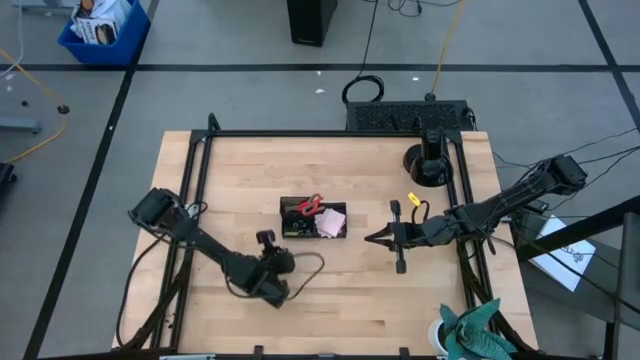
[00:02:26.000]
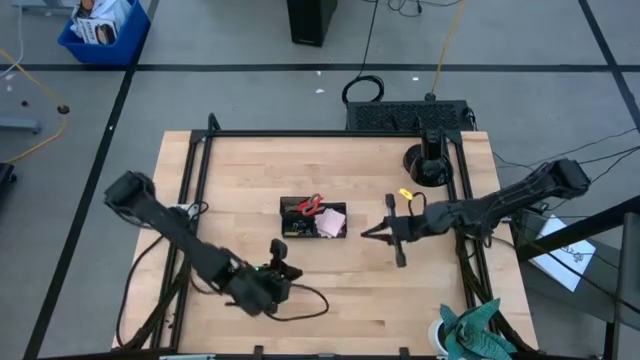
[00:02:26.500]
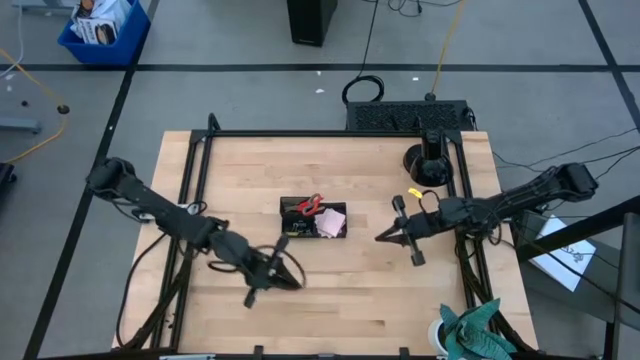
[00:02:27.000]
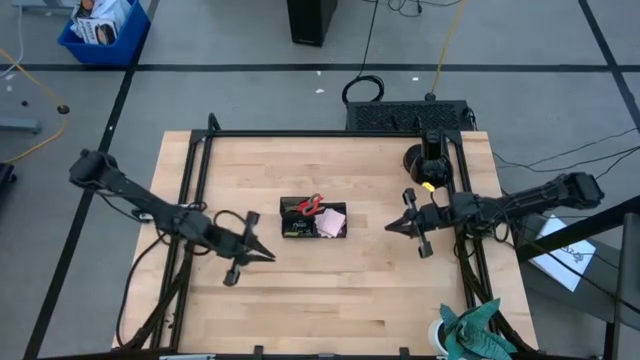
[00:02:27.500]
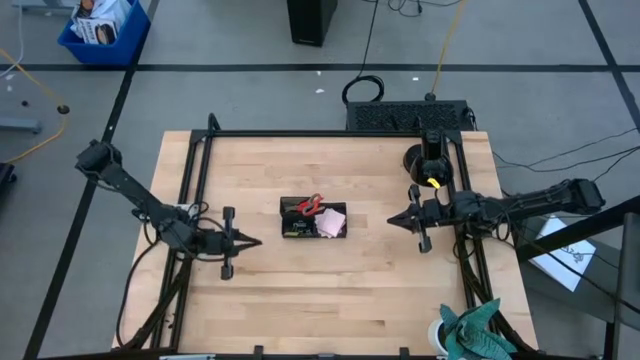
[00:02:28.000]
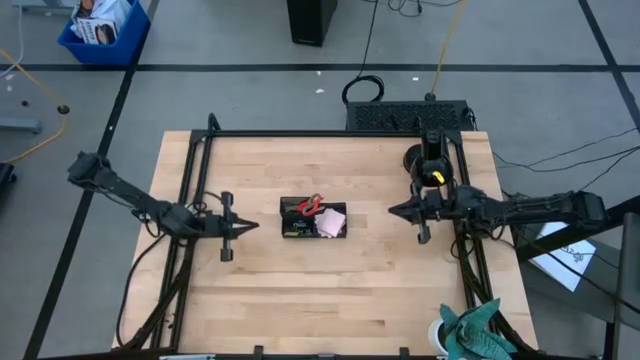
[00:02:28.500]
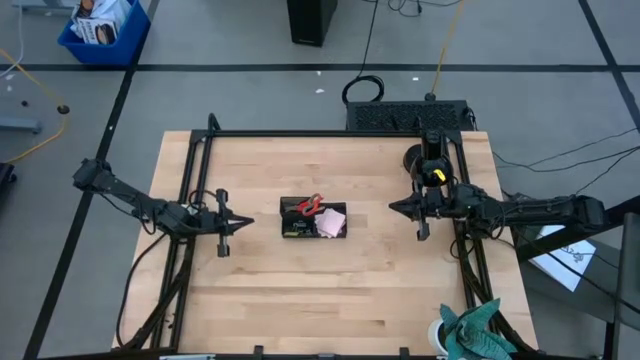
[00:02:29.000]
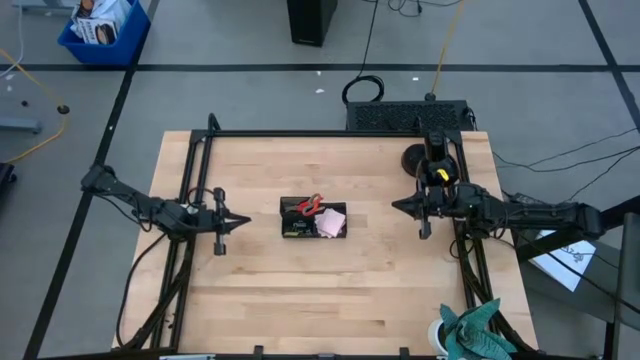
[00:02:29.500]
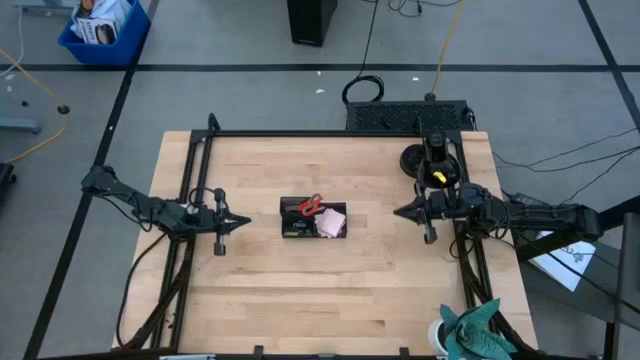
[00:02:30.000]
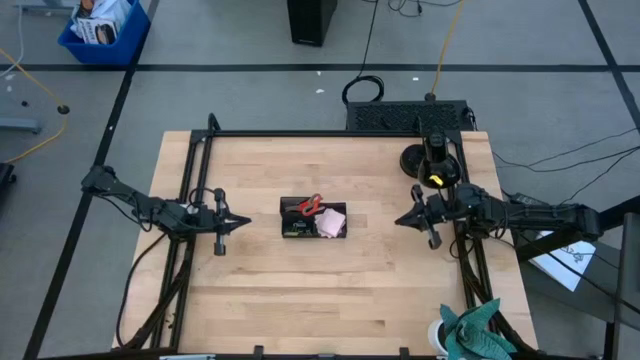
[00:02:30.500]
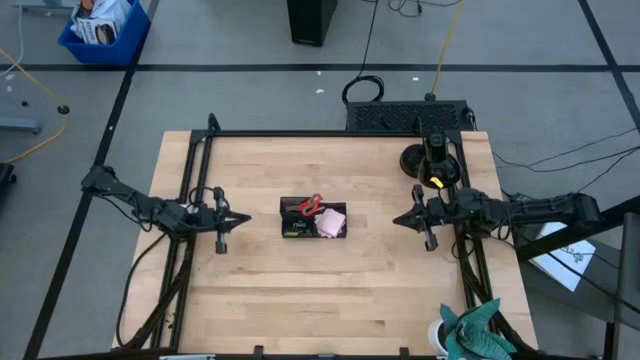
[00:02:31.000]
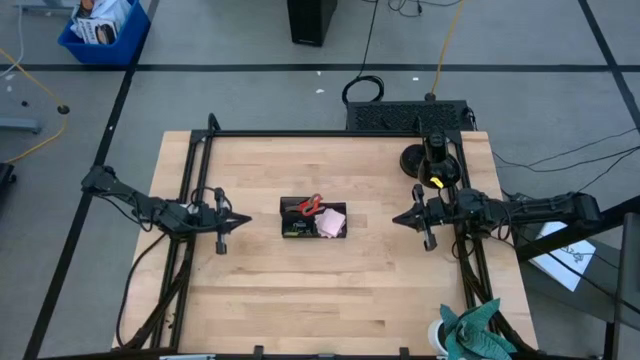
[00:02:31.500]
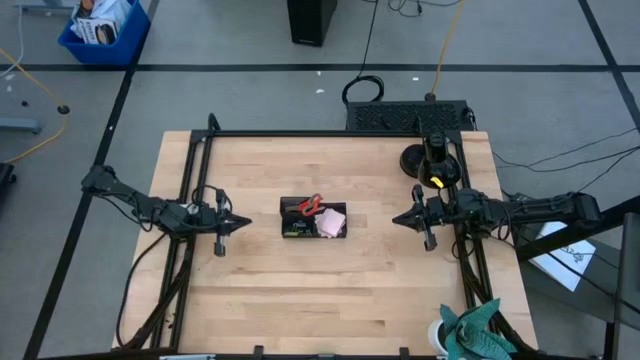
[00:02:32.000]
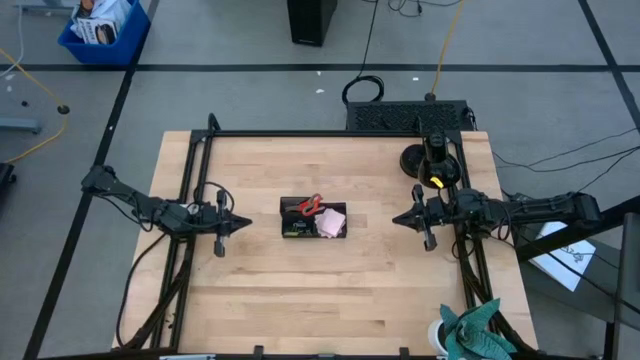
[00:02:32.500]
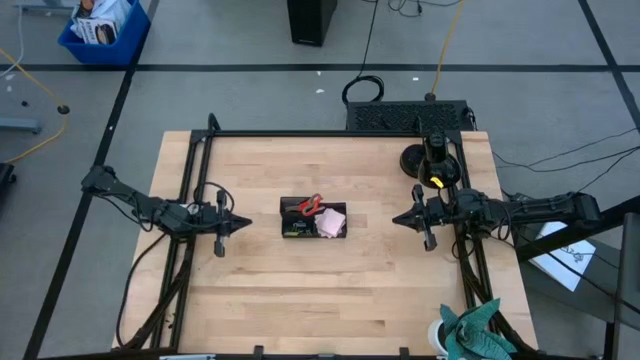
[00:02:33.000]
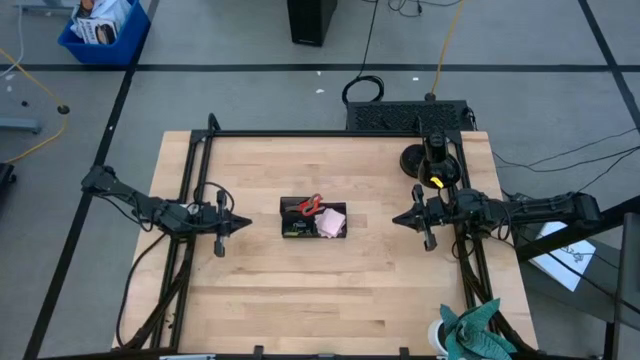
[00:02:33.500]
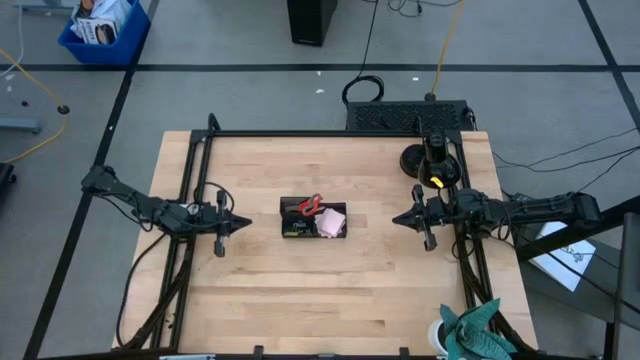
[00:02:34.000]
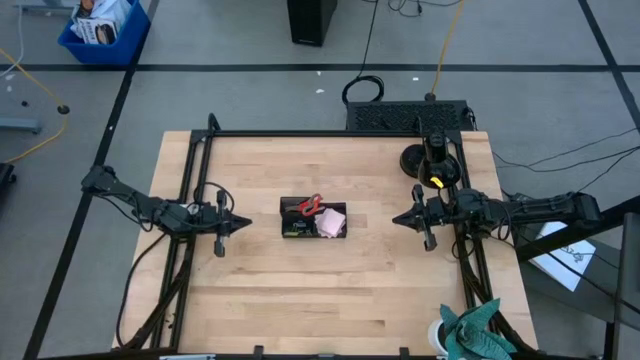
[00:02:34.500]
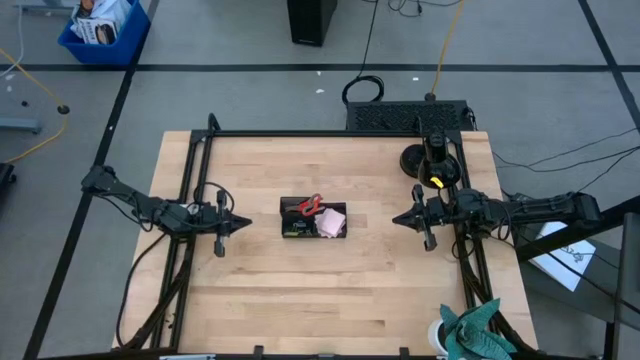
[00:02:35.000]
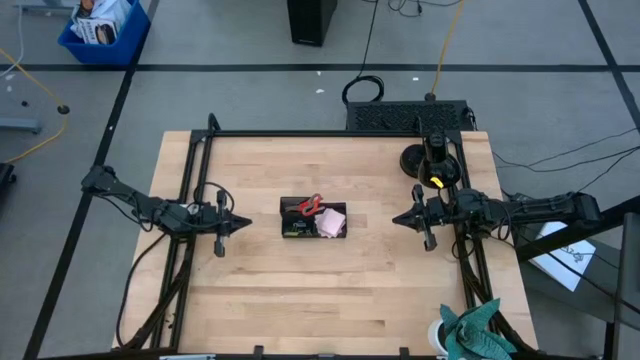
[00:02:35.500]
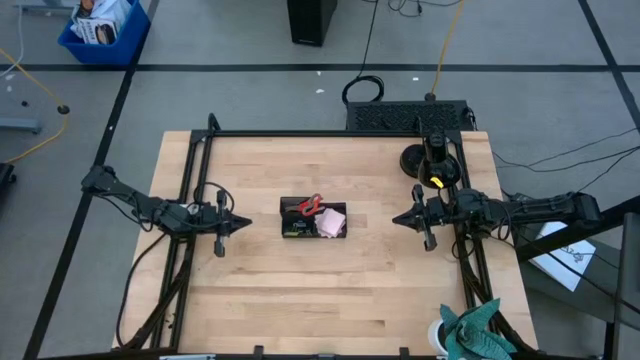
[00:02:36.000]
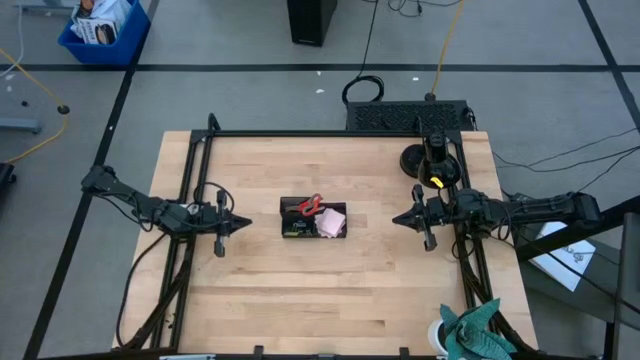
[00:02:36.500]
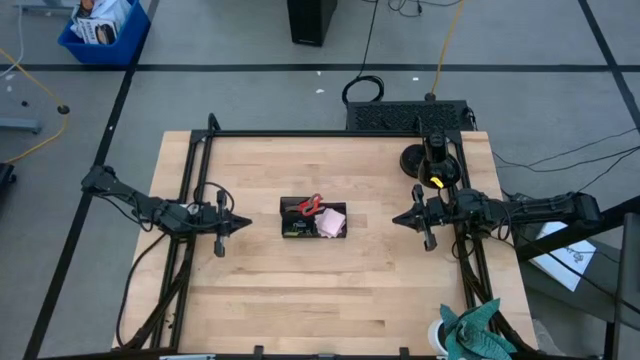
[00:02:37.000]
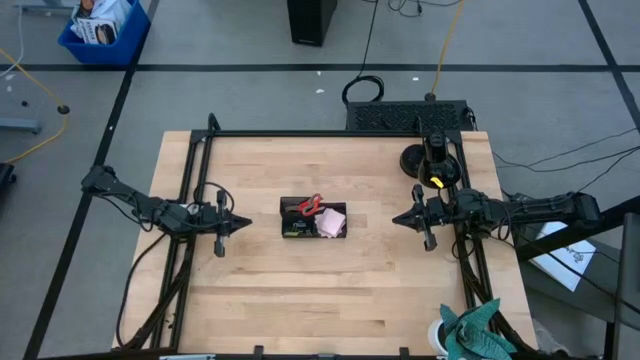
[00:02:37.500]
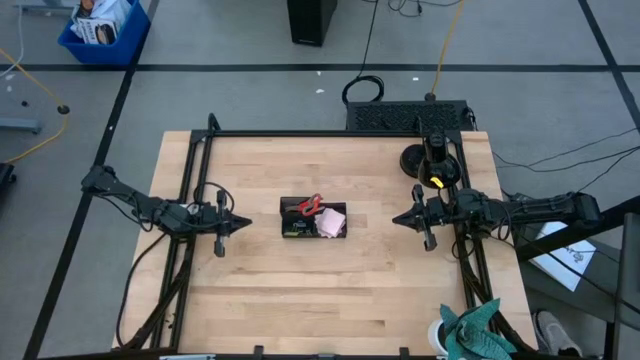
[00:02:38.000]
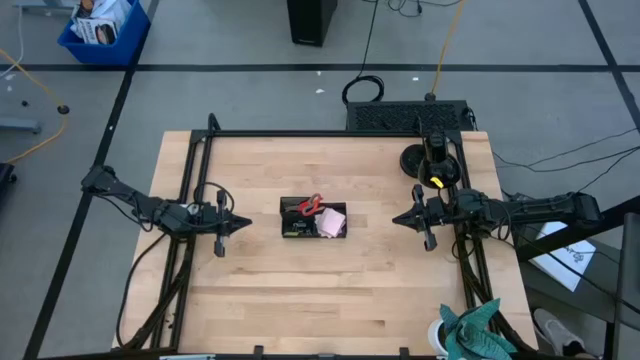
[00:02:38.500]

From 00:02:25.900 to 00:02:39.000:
Task: Pick and place office supplies into organizer
Return to Home Position

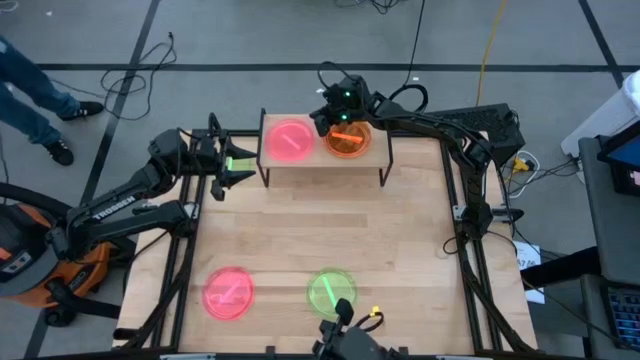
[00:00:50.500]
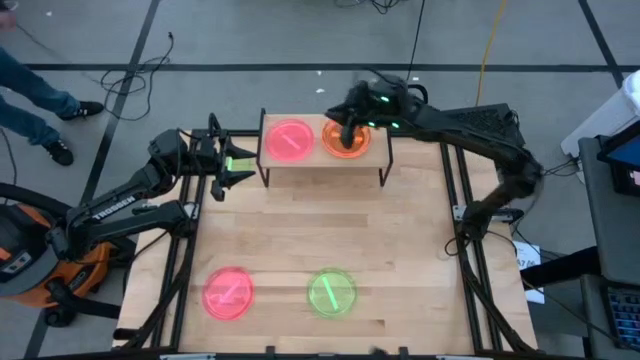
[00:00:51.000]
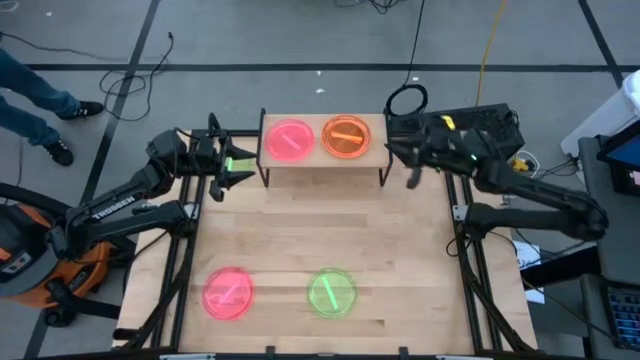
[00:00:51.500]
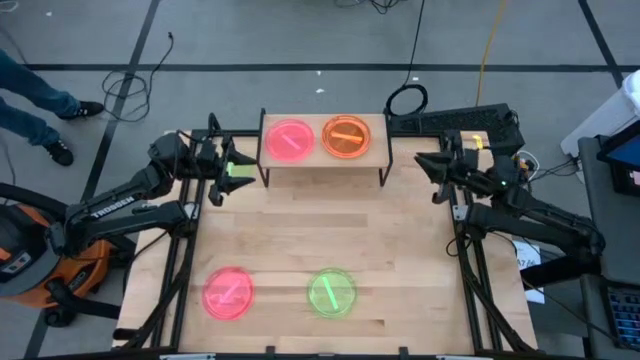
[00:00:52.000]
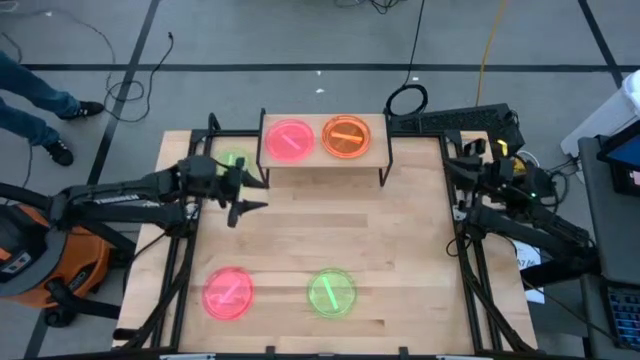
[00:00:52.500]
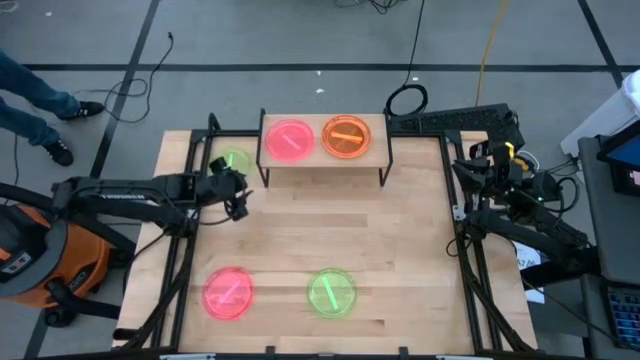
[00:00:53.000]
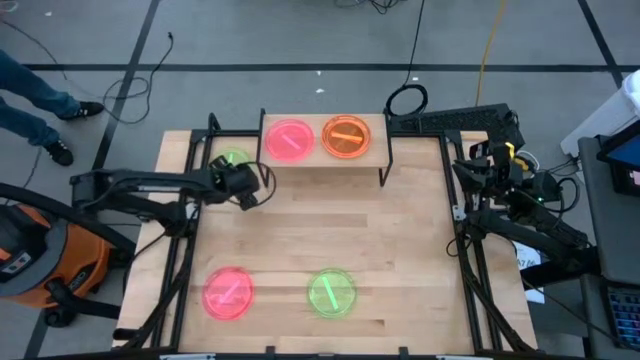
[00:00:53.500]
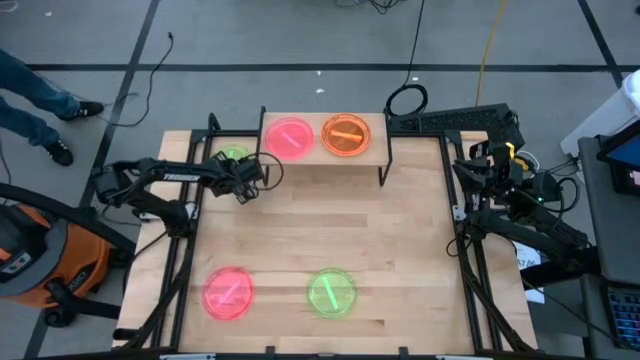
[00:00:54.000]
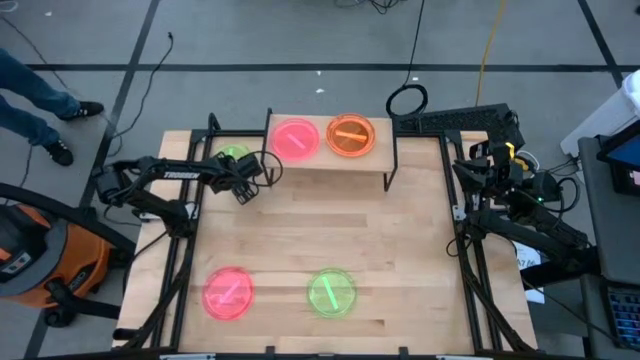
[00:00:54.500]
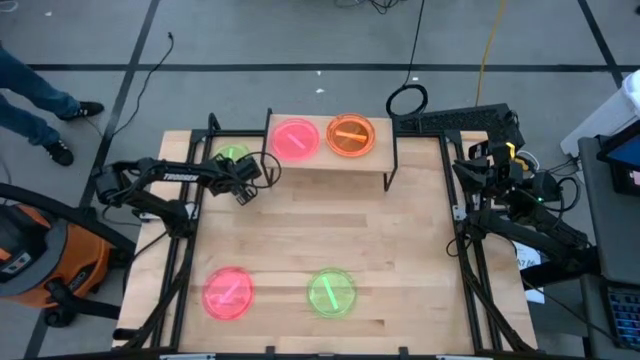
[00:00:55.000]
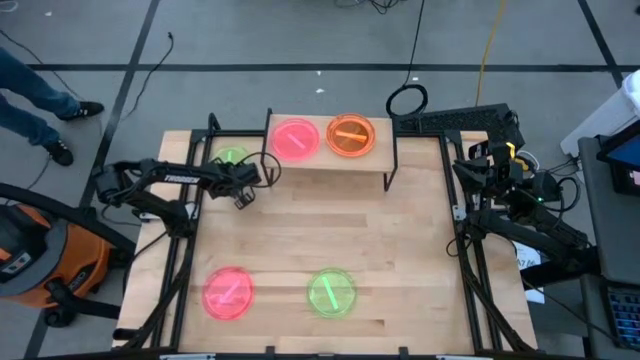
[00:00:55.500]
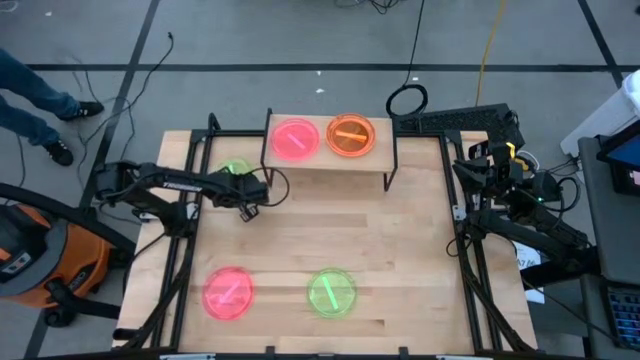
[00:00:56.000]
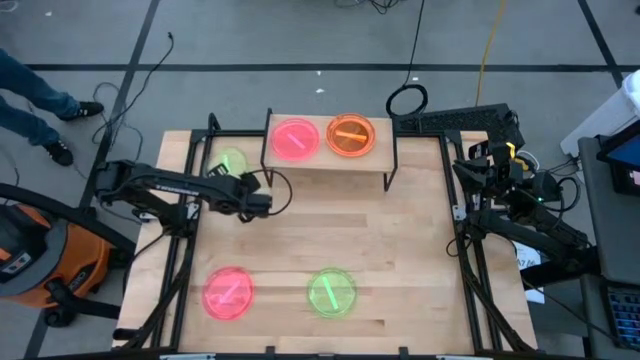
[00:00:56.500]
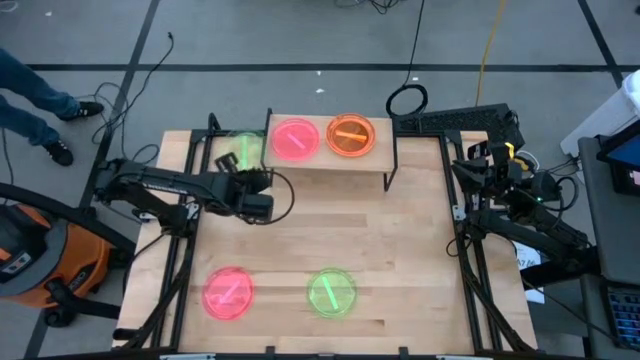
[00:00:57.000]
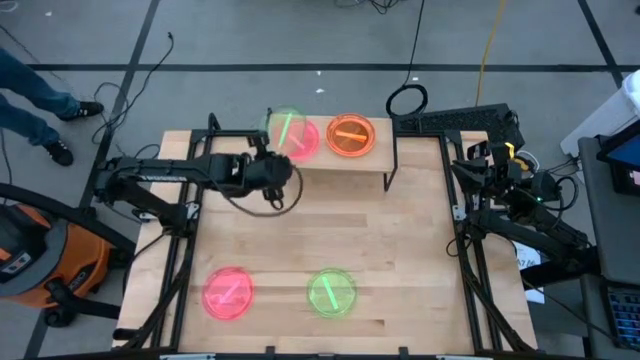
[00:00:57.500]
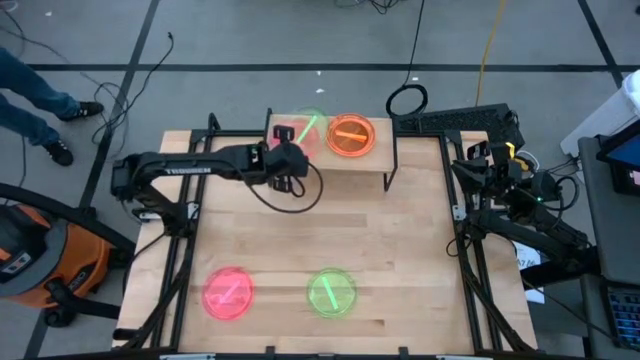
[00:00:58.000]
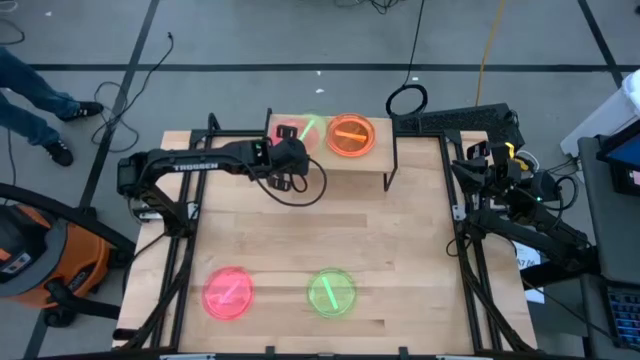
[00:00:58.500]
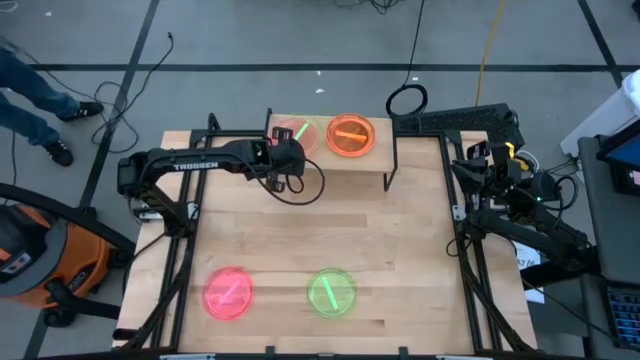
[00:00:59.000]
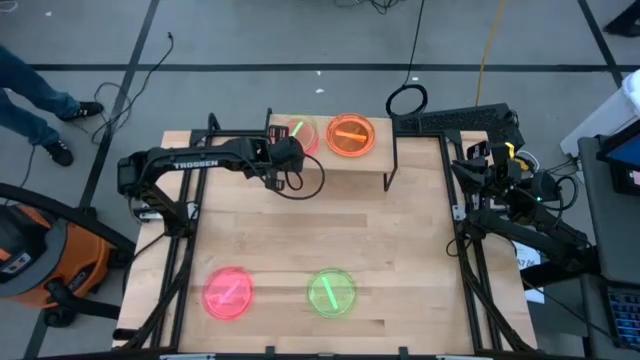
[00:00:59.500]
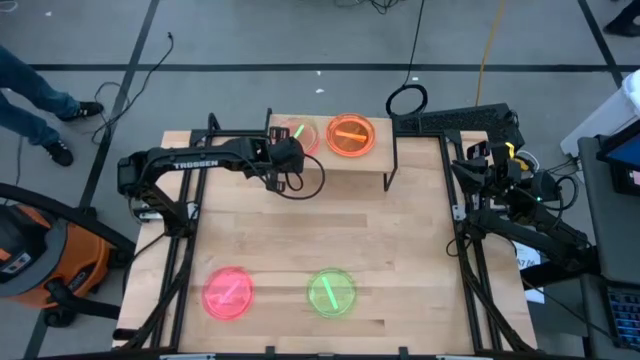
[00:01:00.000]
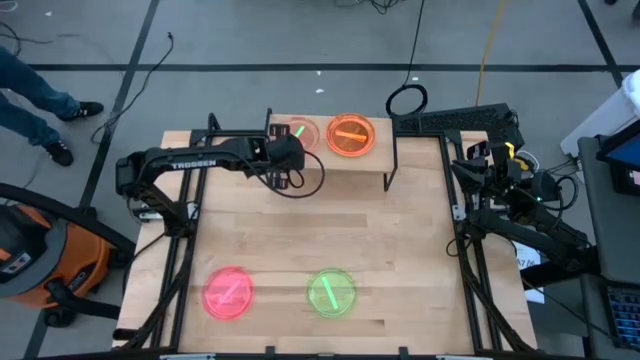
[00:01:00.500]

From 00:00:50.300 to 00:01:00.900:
Task: Place and stack plates onto a shelf
Stack the green plate on top of the pink plate on the shelf
